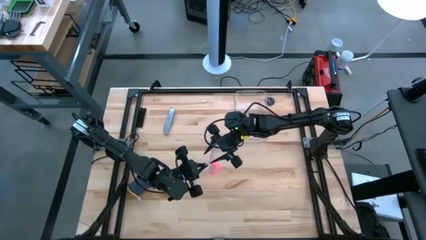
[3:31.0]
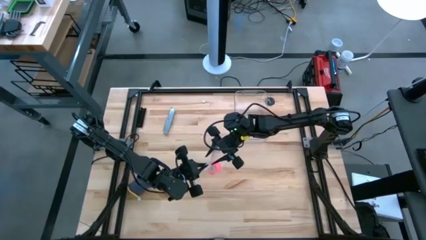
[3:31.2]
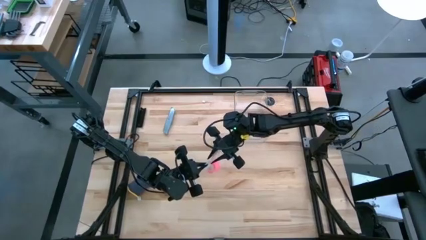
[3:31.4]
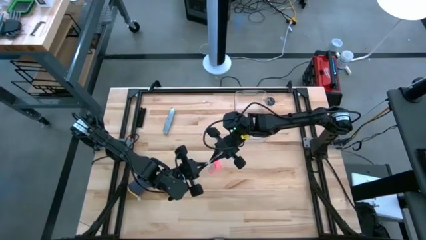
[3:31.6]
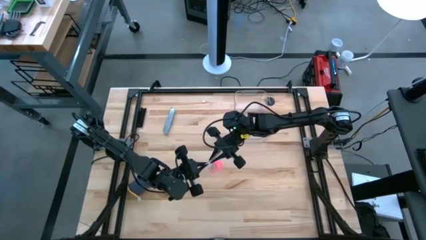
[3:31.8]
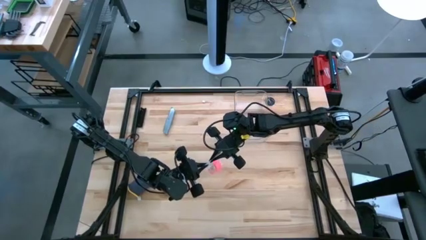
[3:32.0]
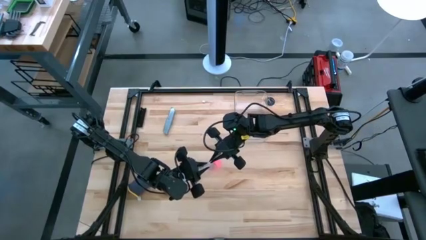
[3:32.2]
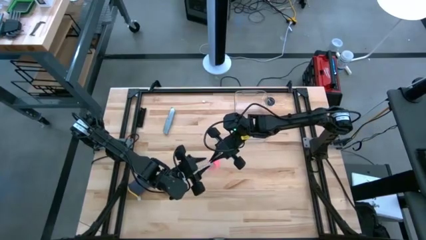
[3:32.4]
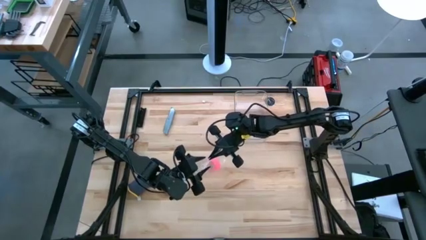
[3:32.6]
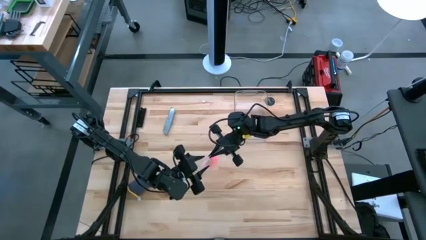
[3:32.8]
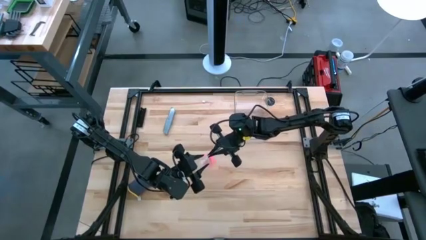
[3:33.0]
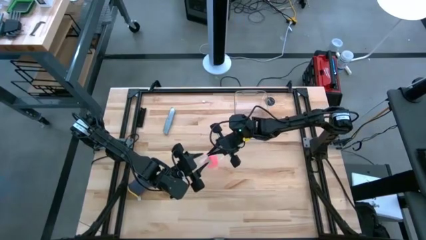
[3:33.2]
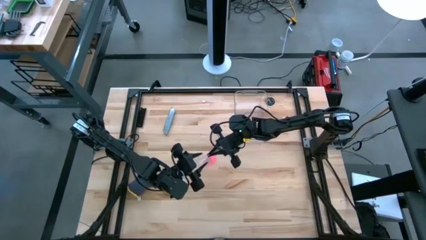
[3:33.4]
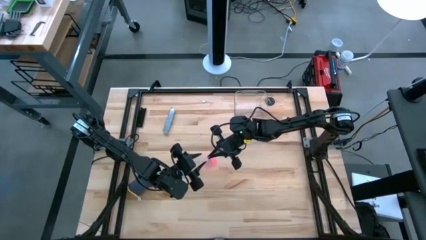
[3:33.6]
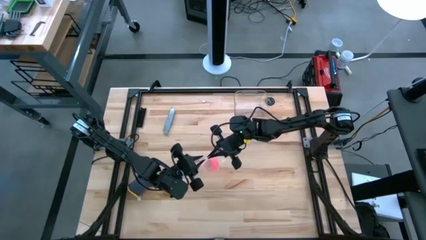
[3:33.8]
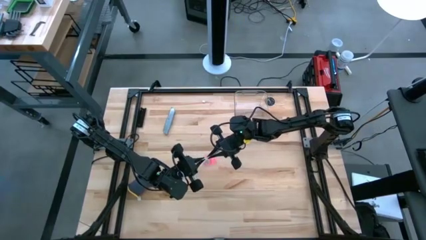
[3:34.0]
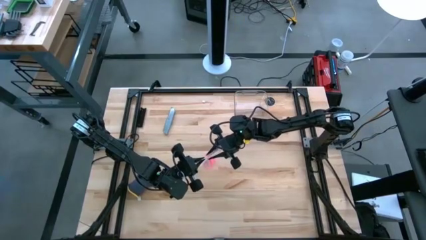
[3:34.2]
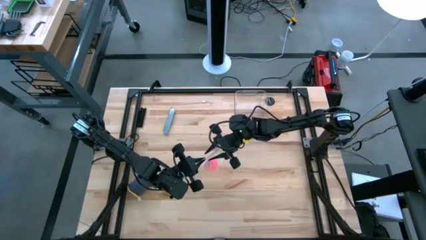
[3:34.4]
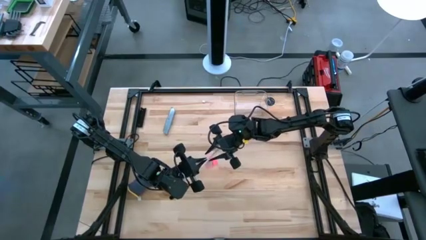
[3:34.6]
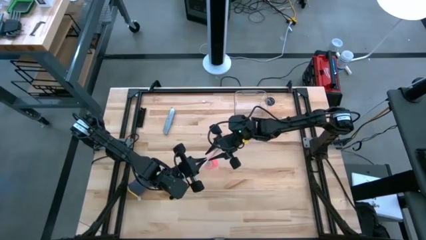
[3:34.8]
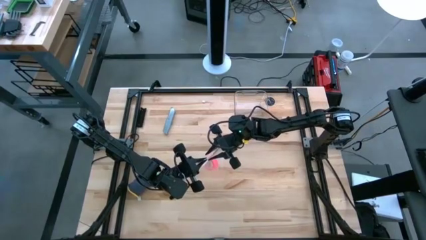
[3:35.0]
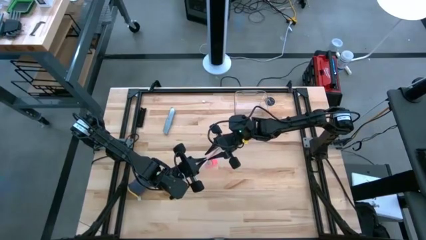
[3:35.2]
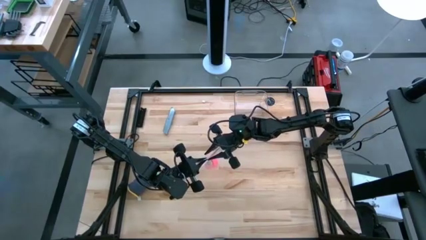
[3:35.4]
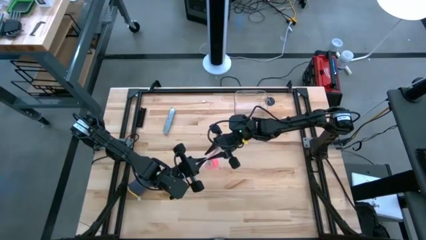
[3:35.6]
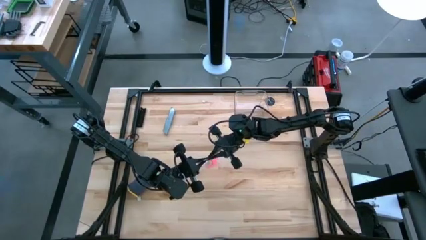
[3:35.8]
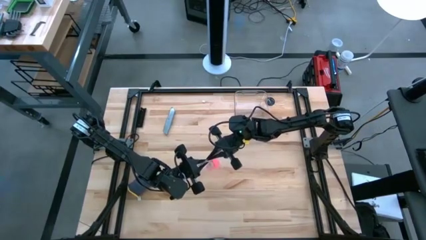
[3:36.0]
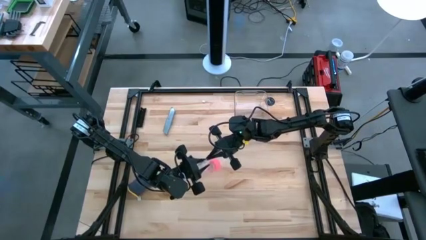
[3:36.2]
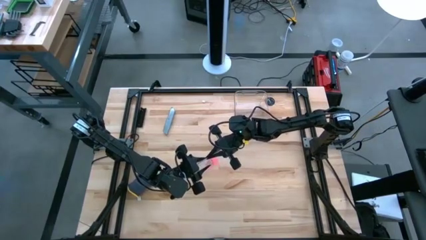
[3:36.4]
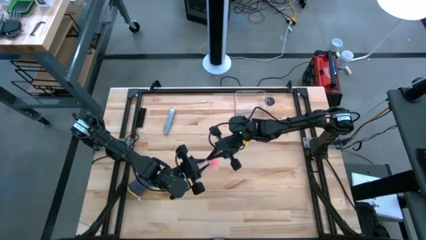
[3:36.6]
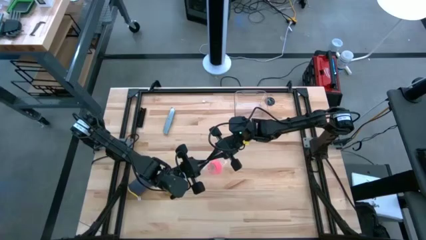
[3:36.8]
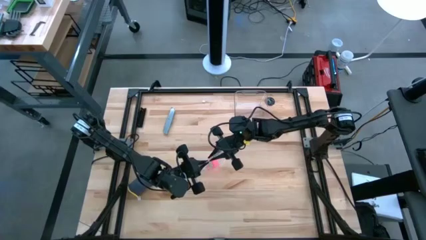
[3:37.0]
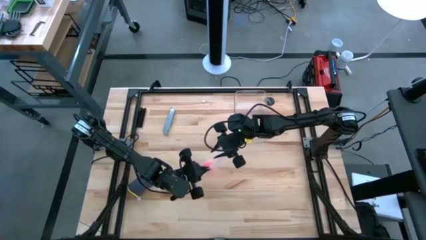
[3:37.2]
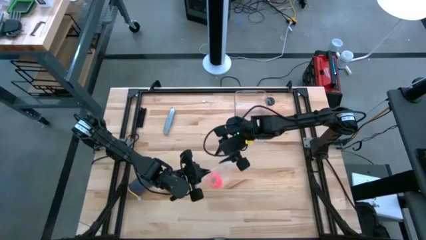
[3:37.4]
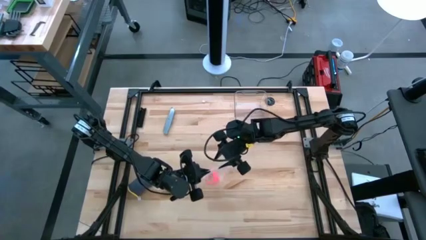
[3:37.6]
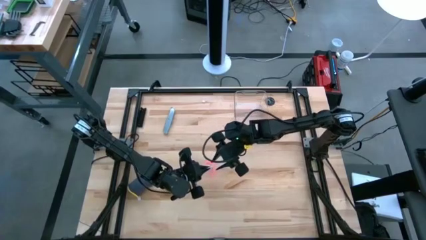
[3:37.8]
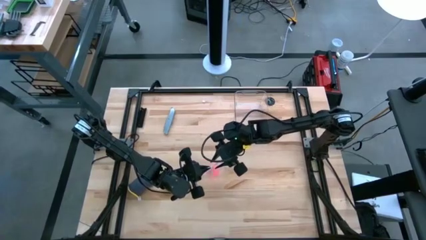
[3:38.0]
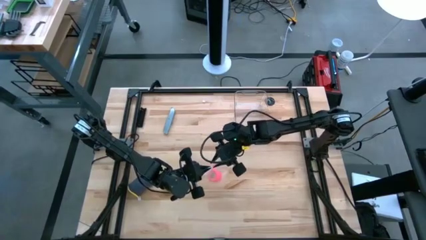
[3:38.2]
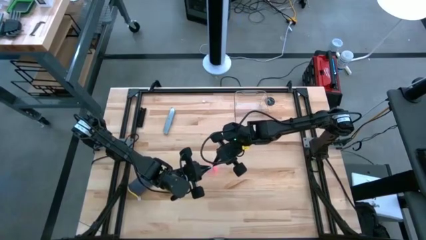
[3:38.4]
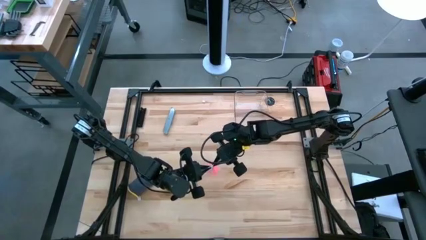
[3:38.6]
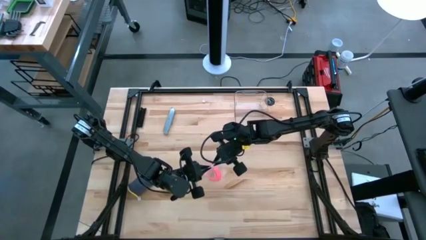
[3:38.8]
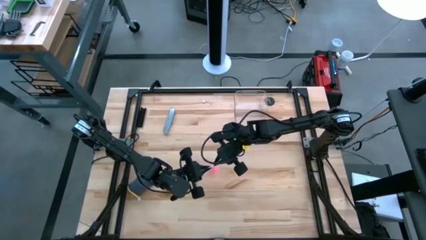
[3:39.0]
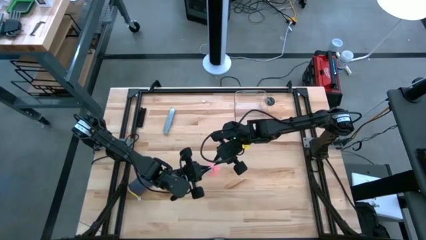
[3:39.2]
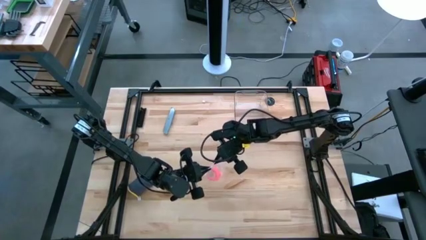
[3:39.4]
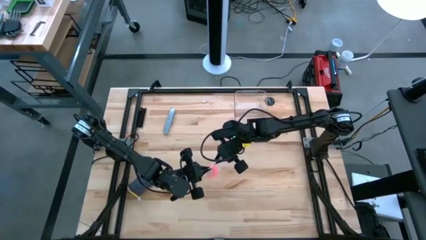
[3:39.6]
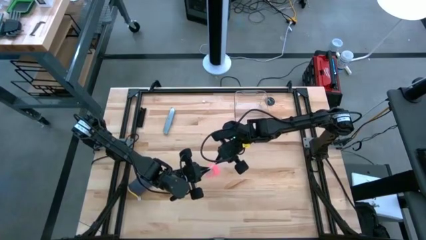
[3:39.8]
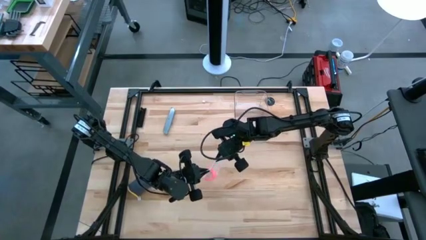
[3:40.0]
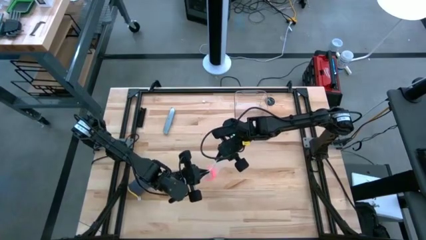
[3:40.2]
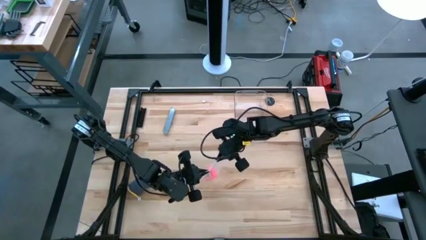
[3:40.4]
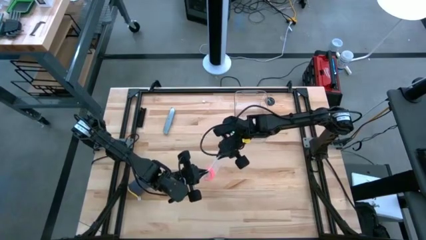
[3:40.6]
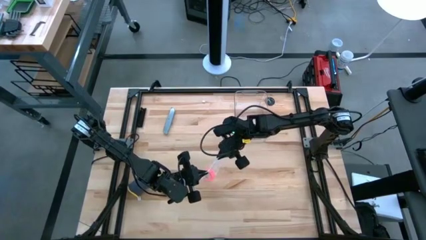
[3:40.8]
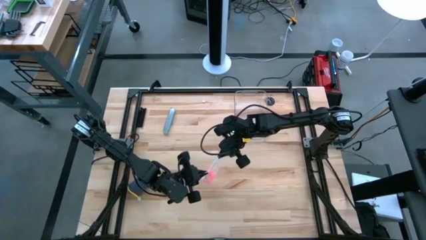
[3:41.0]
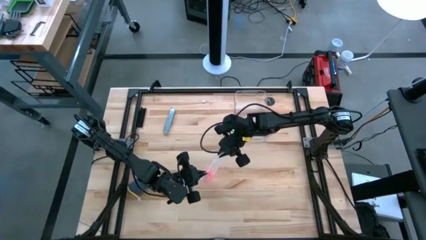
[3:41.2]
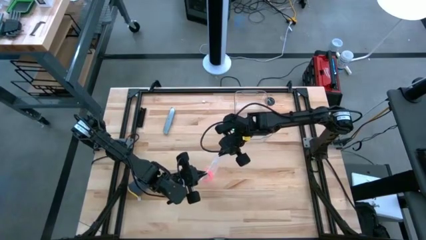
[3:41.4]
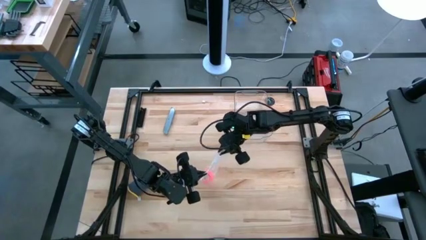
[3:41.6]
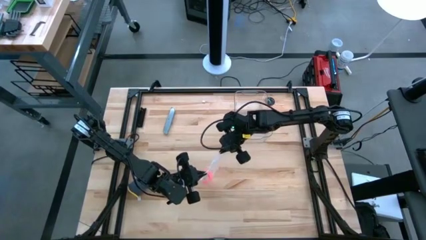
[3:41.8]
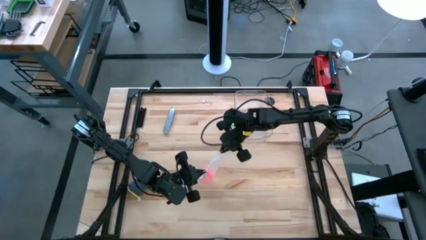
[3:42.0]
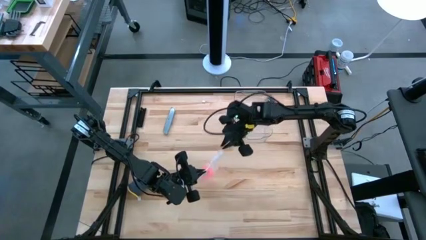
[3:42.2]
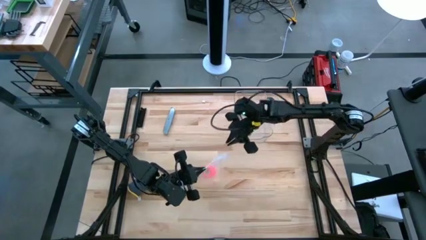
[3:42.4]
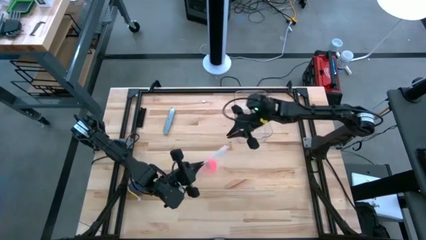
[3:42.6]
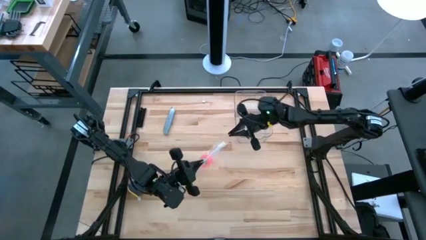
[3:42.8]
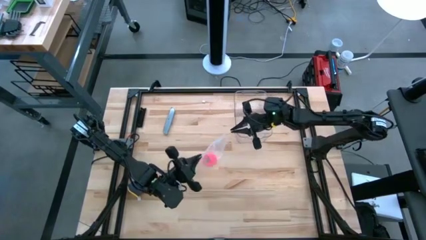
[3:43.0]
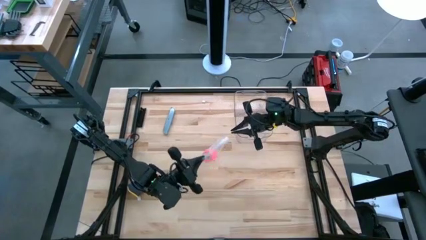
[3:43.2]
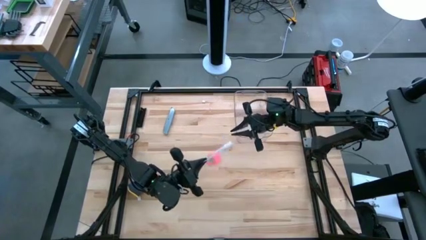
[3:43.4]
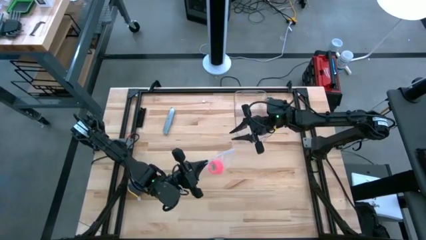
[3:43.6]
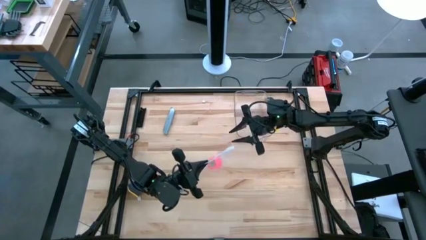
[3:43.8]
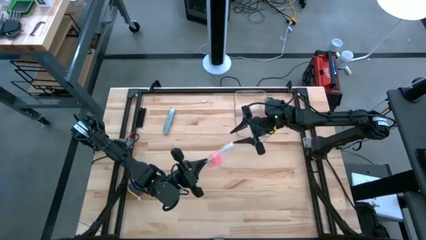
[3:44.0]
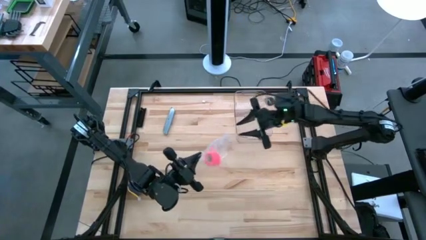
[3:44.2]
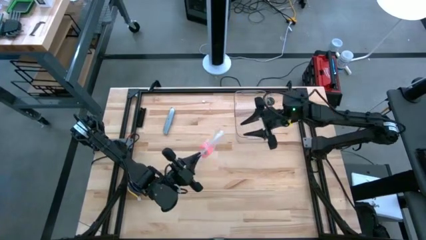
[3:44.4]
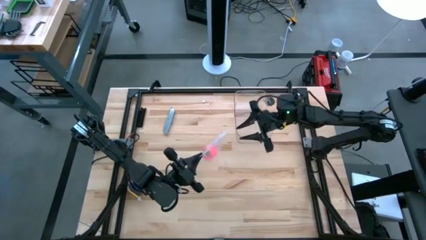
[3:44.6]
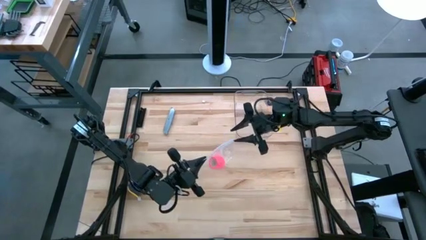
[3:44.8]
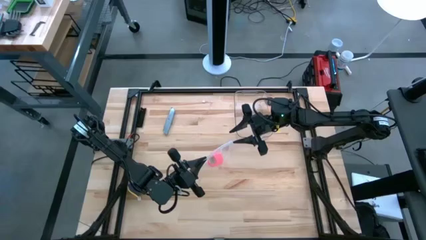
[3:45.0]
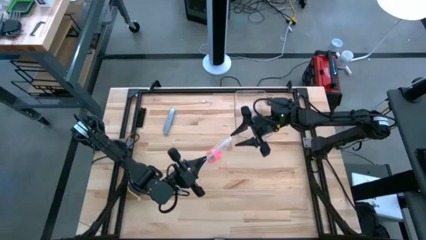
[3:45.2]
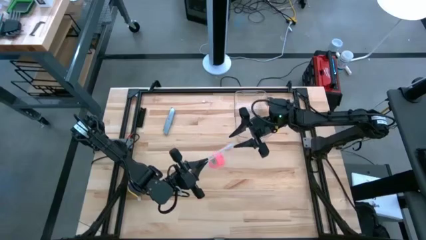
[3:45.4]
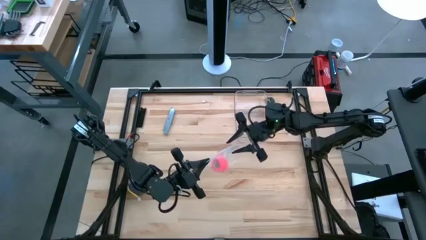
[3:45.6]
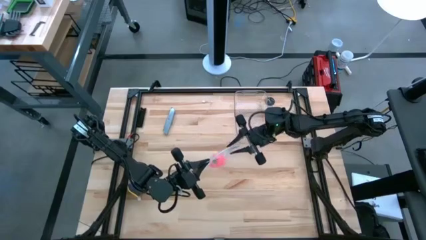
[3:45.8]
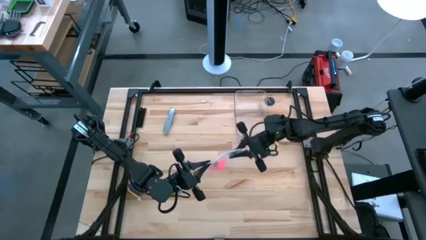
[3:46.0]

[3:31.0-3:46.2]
Task: Roll bandage
Close the transparent zip bag
